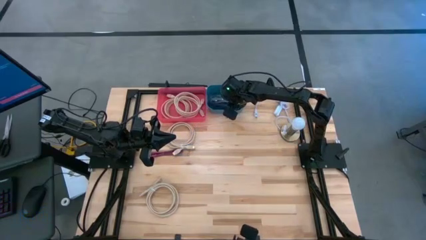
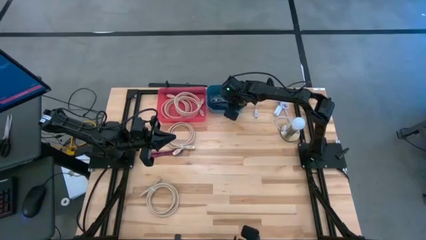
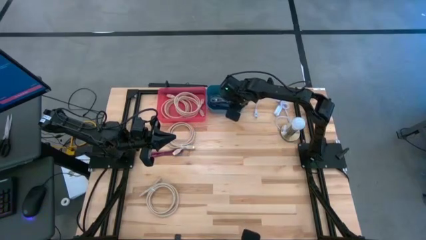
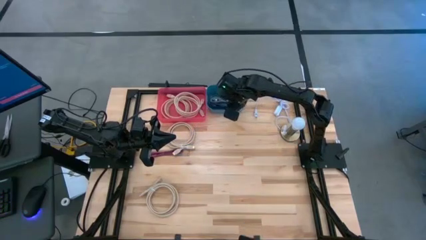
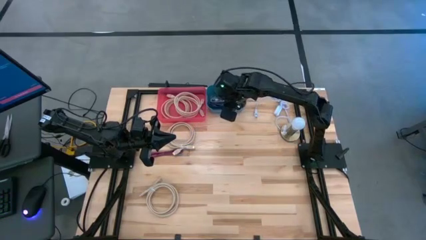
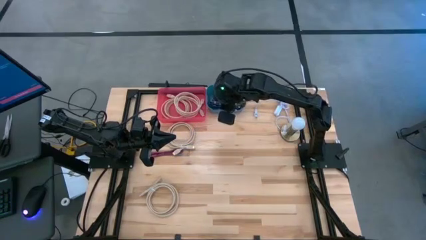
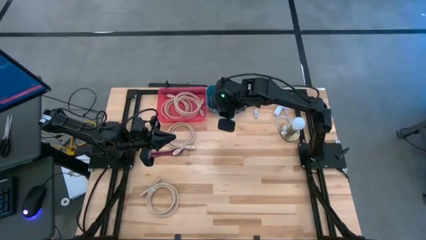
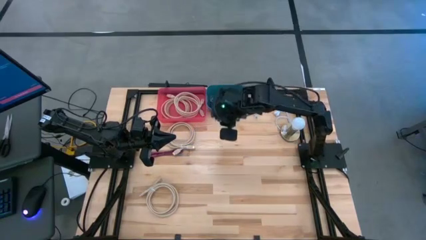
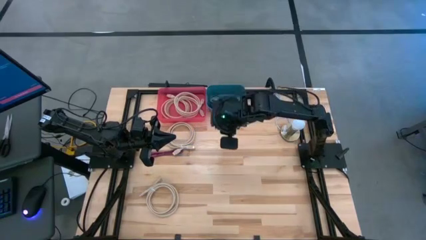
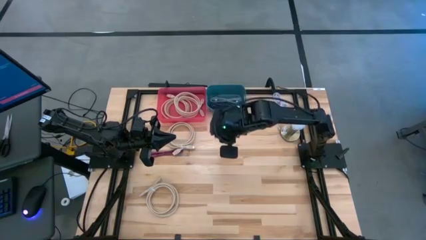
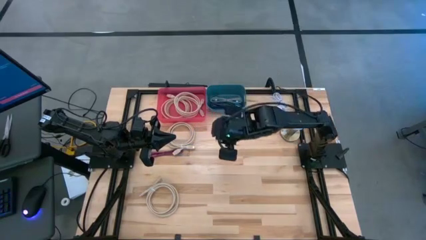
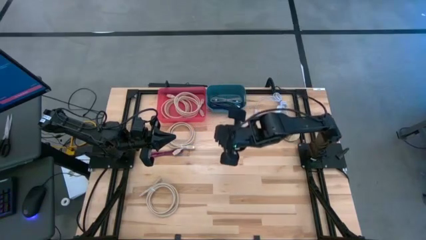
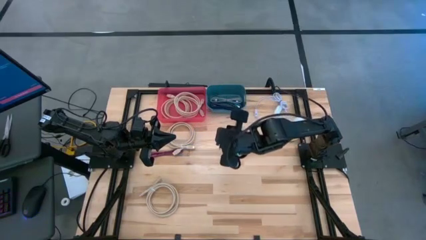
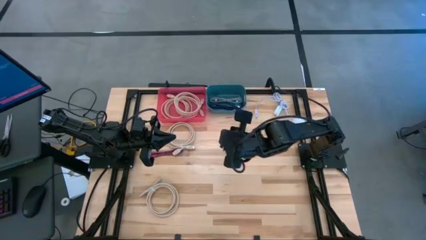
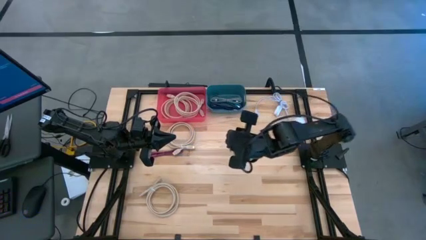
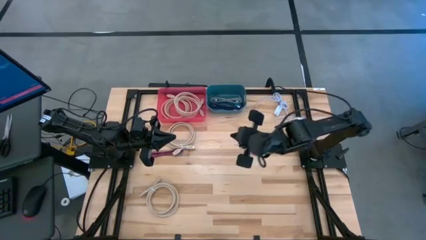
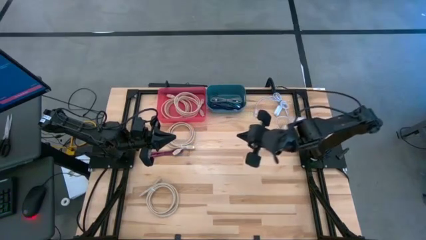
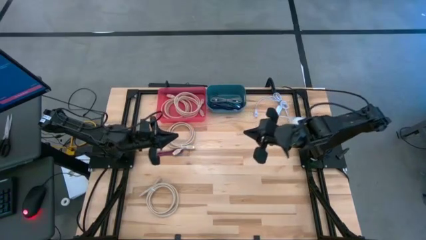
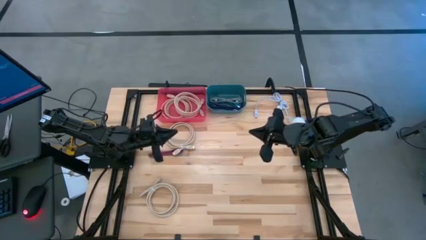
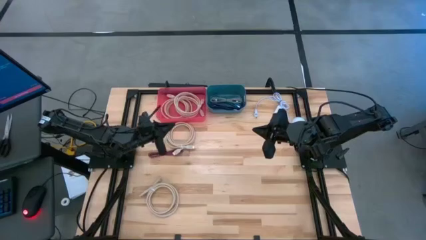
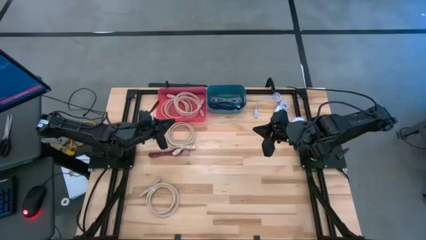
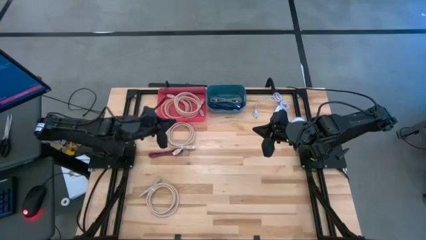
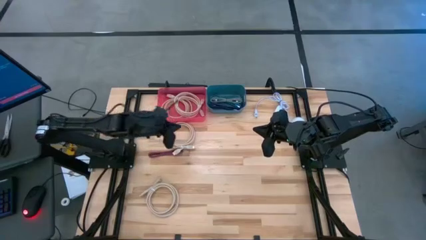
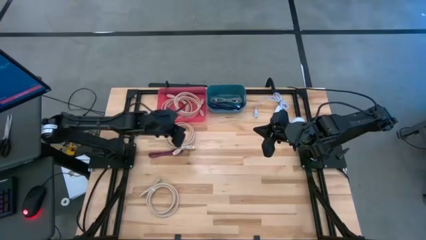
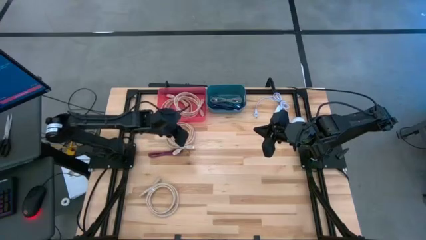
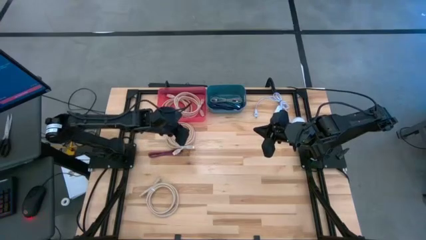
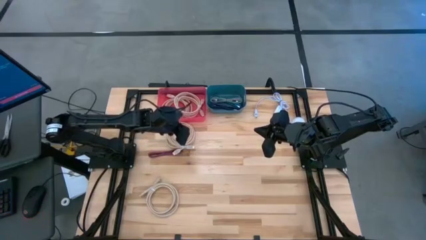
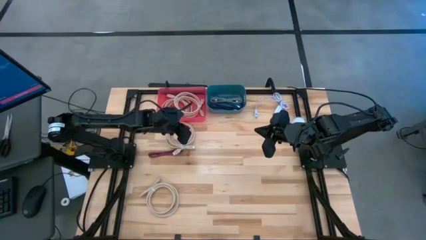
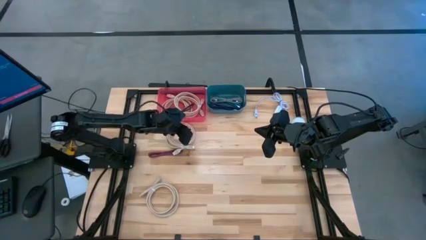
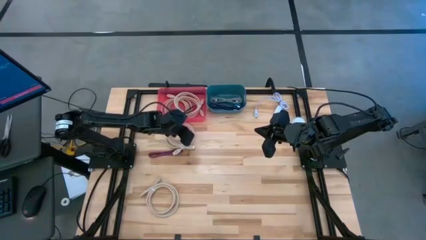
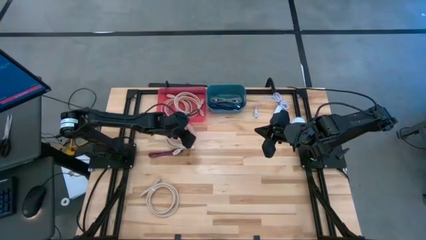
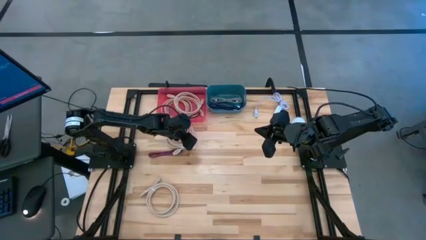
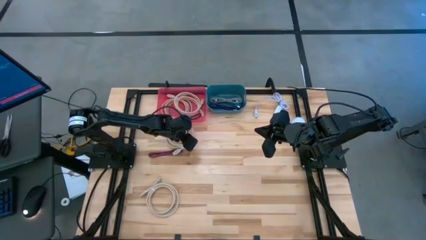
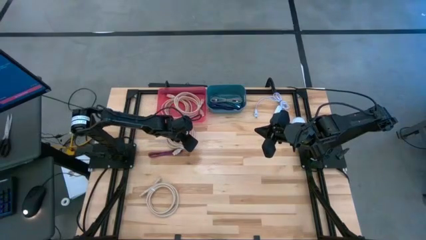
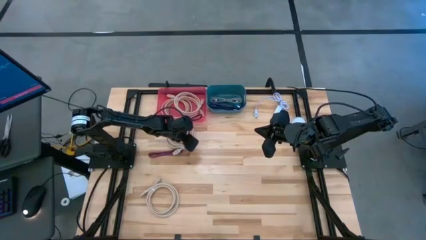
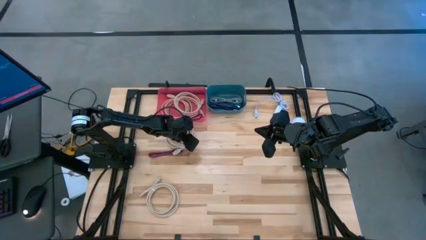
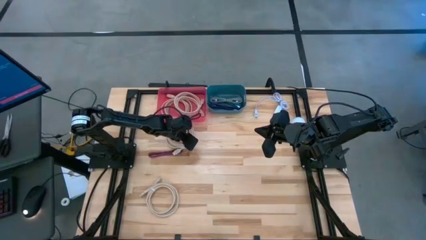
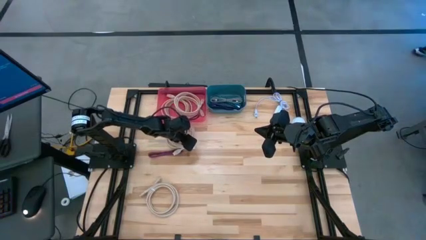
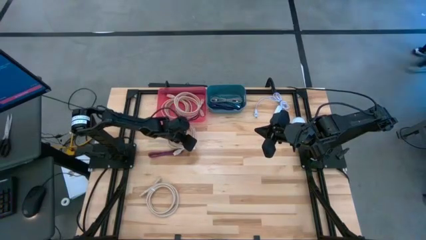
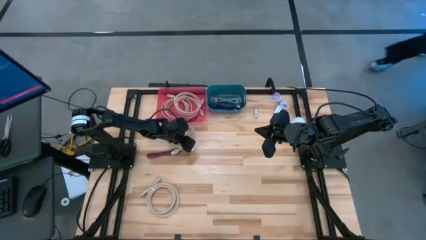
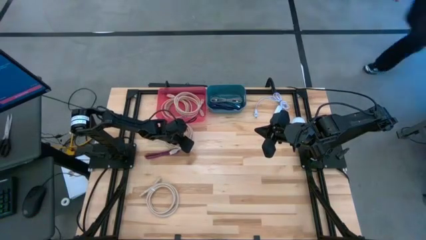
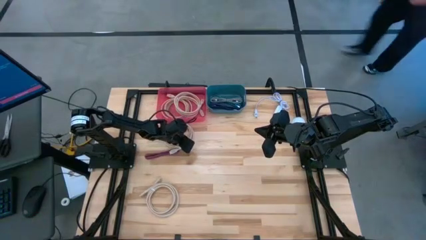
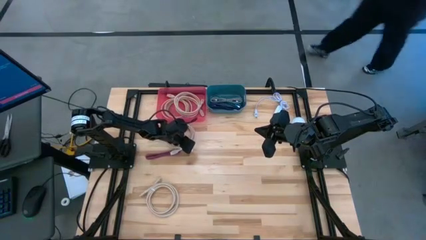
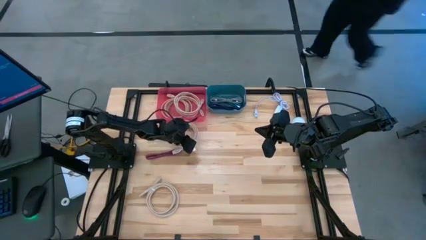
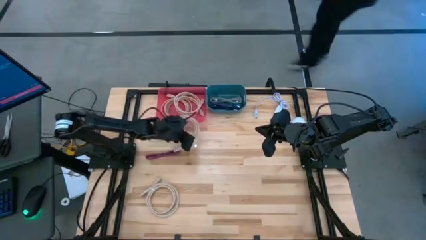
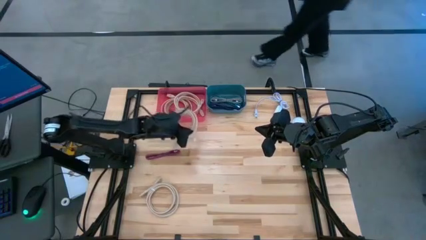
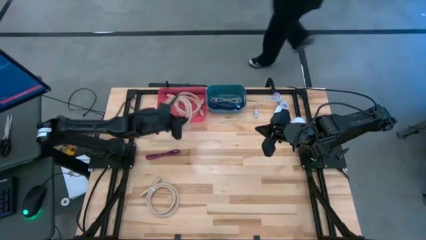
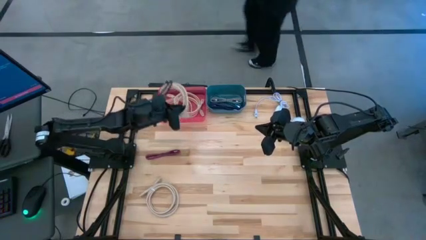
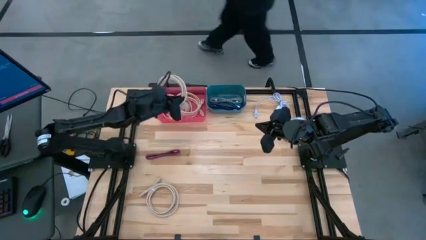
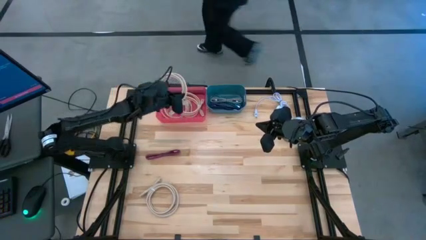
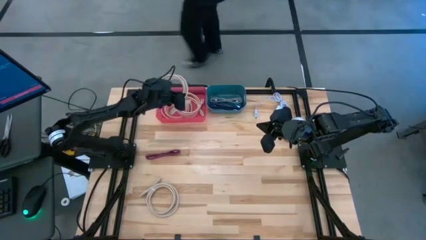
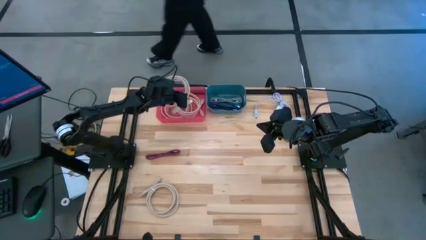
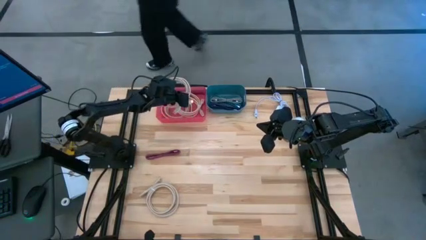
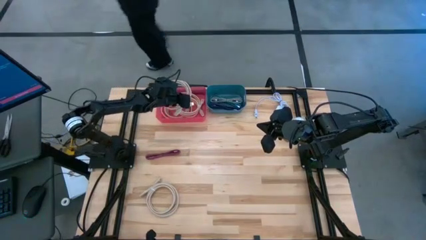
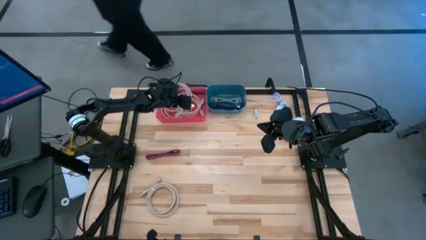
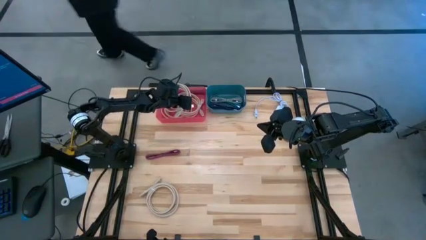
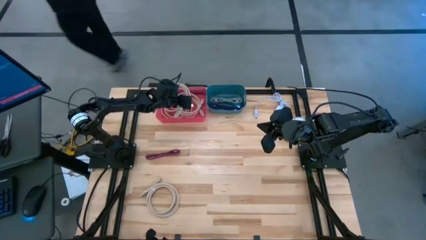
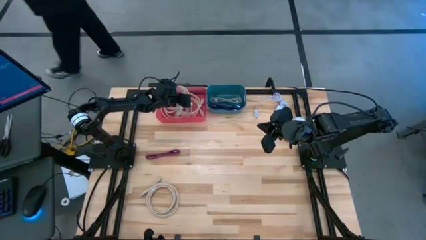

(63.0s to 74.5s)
Task: Pick & Place USB Port
Put the brown HDMI cable into the red bin

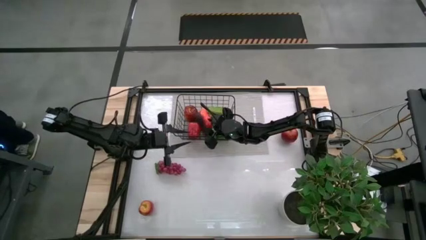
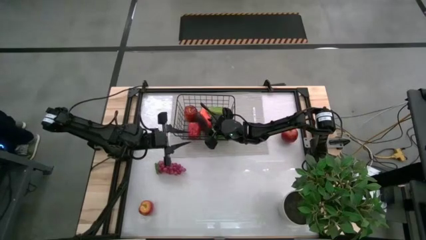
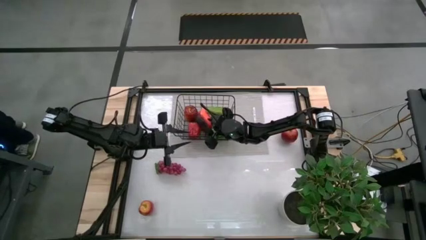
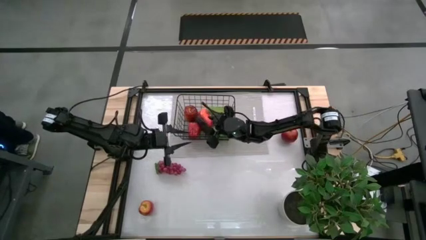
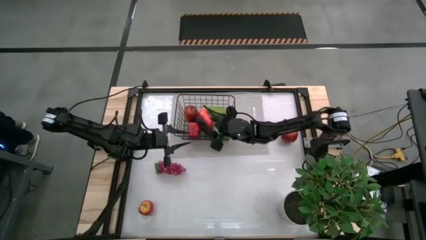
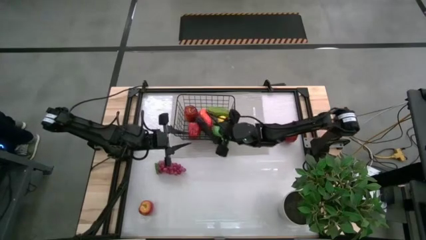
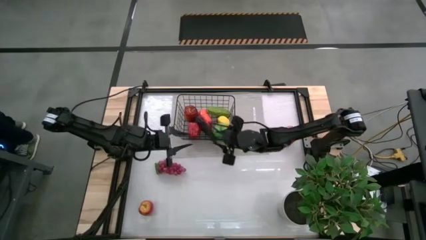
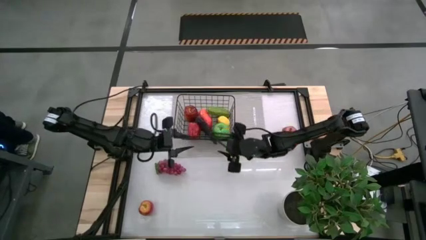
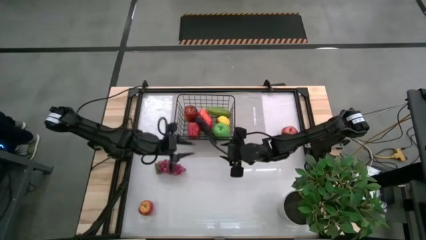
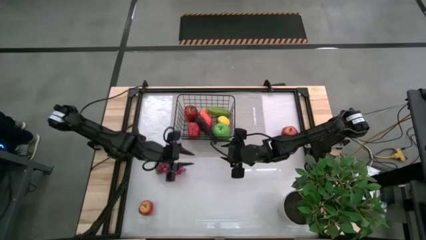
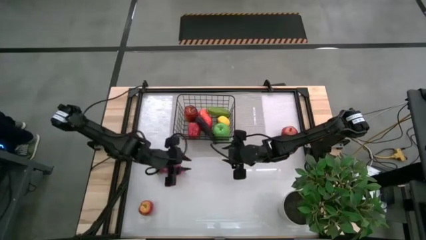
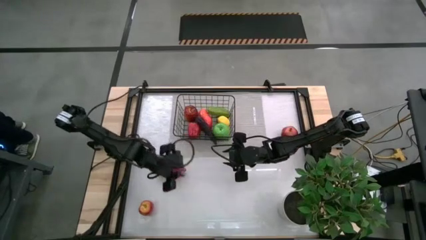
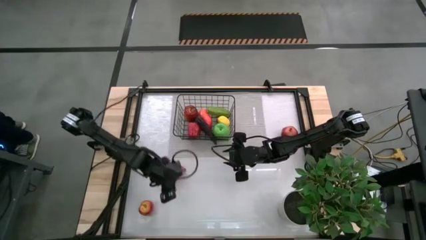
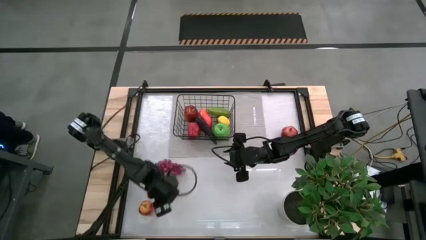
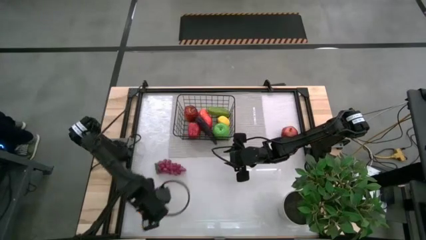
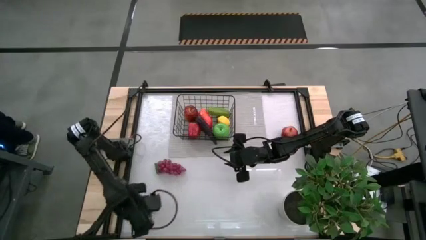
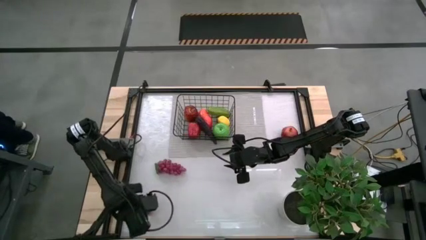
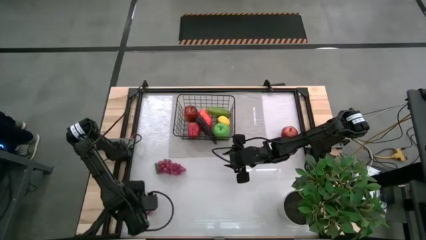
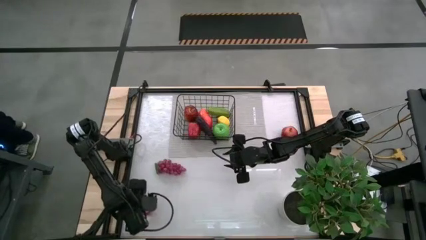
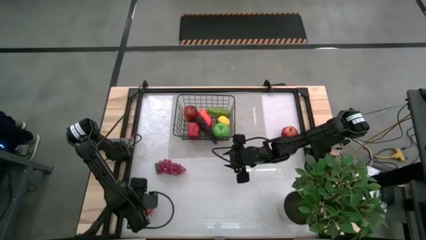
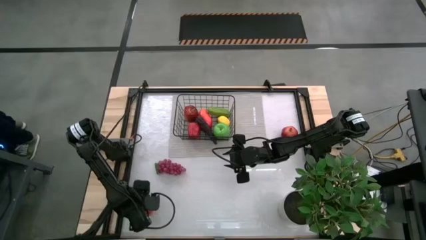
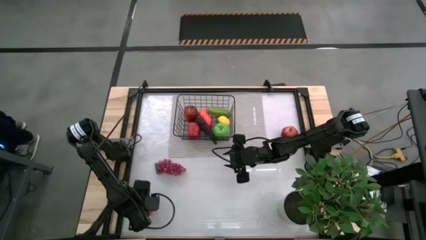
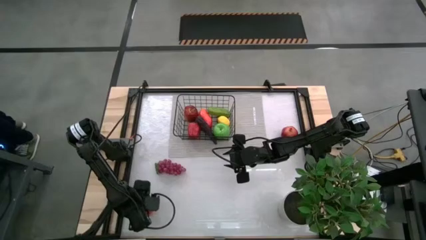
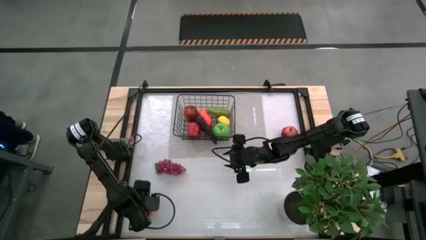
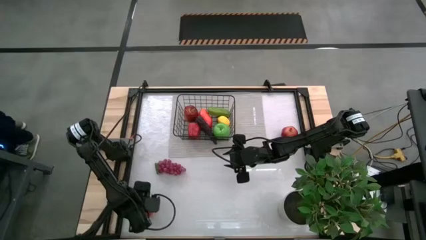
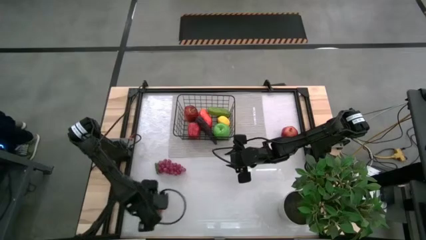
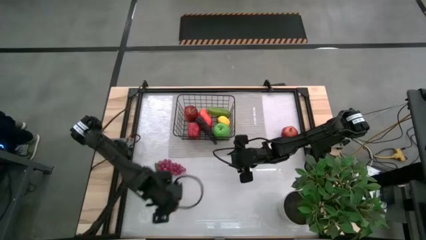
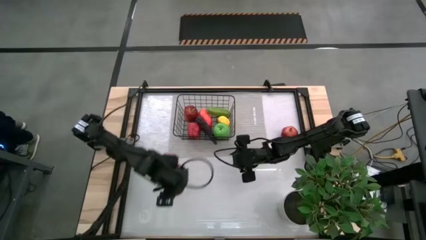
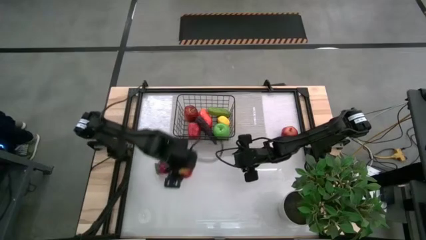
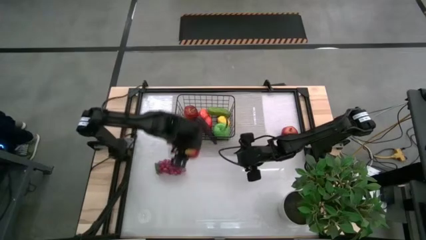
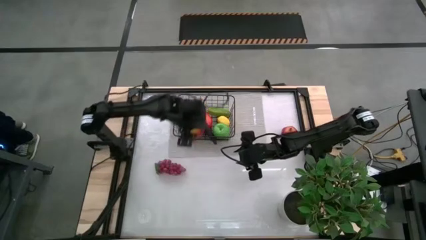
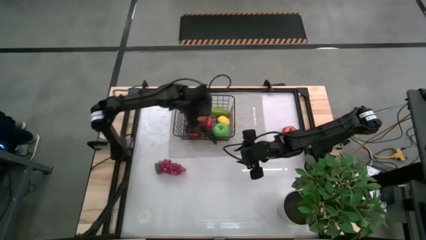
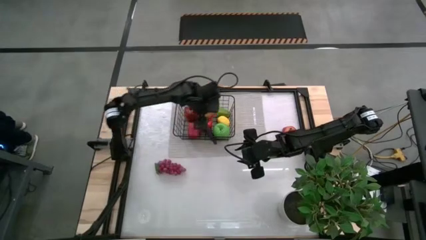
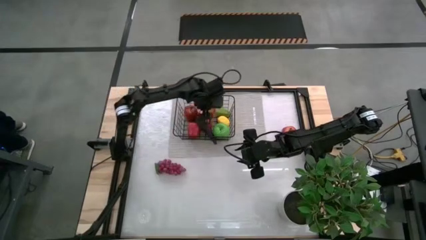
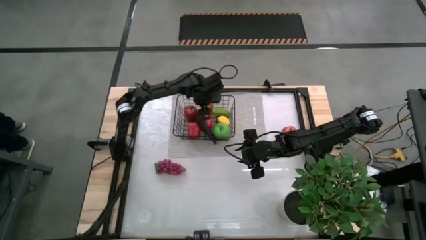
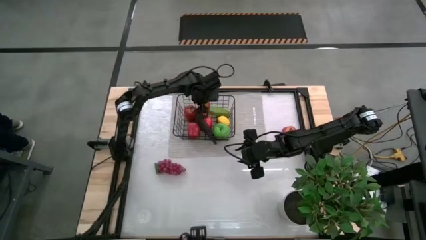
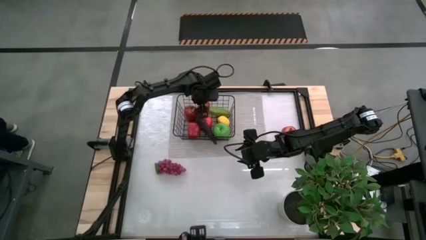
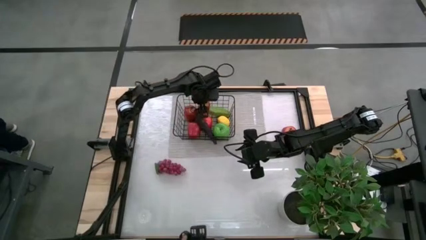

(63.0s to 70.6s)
Task: Build produce basket
Put the red apple into the wire basket
